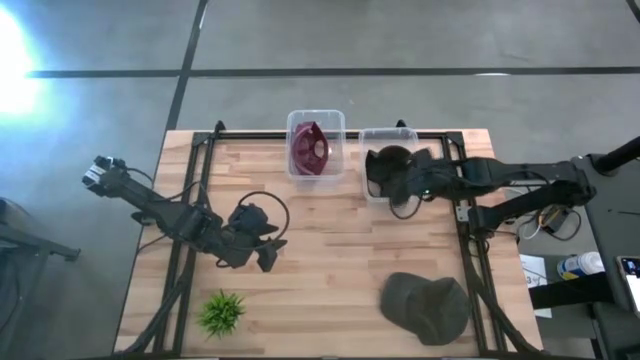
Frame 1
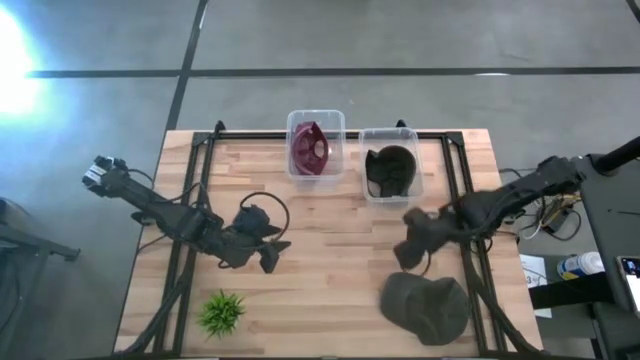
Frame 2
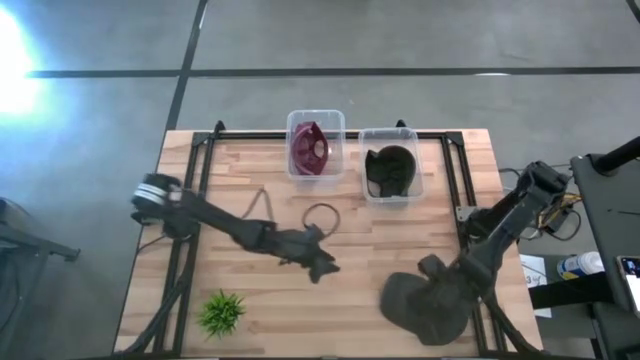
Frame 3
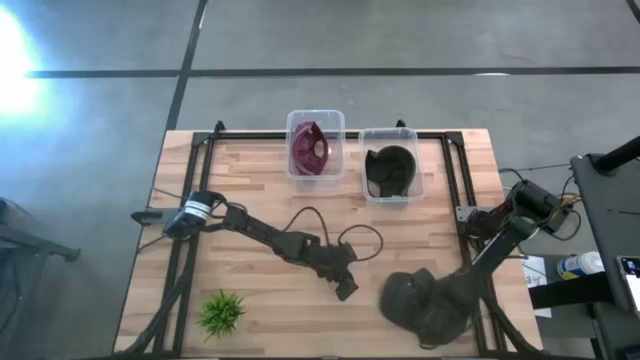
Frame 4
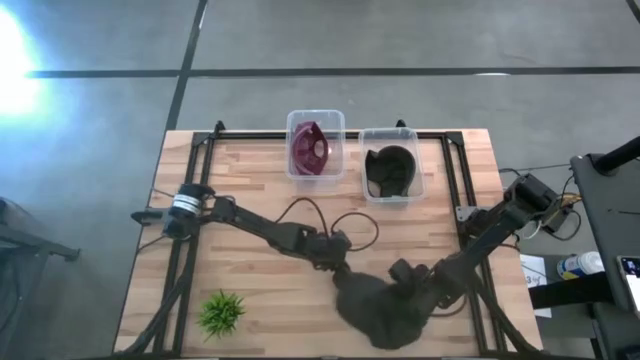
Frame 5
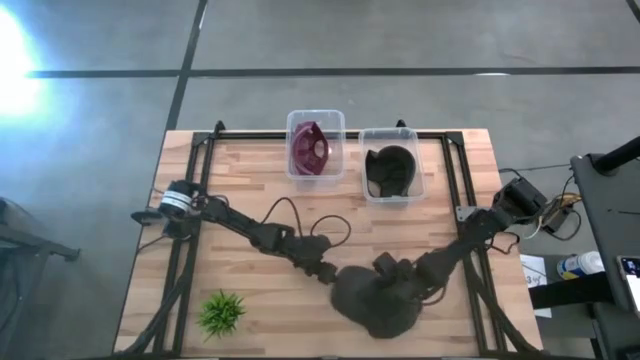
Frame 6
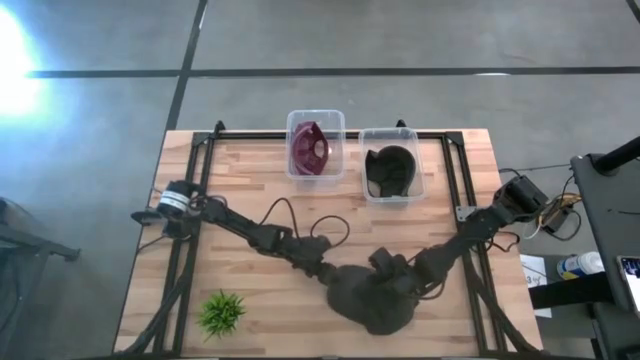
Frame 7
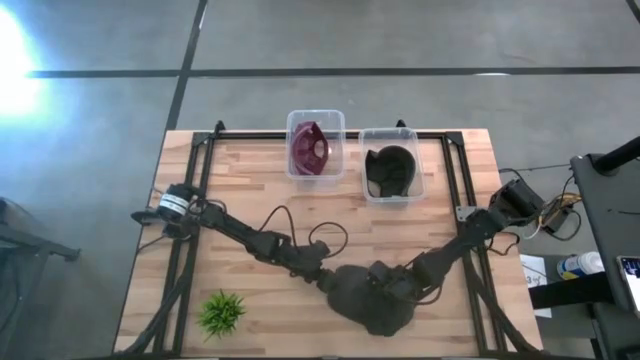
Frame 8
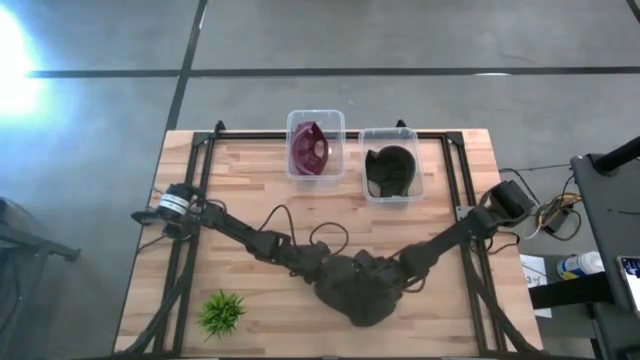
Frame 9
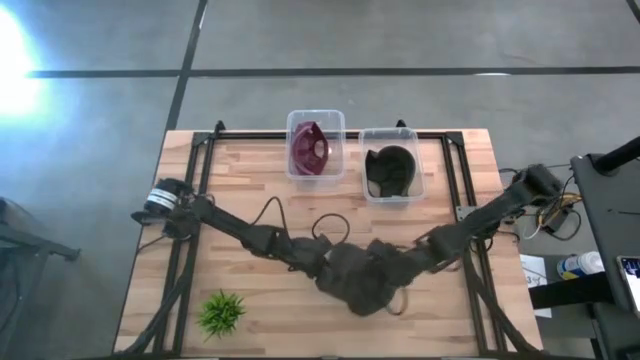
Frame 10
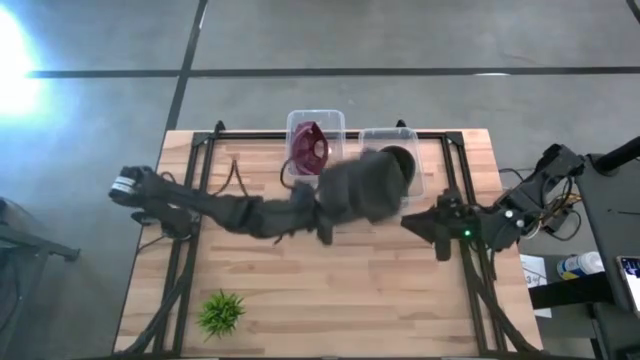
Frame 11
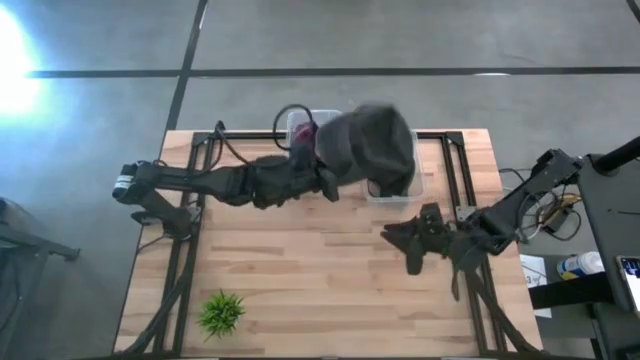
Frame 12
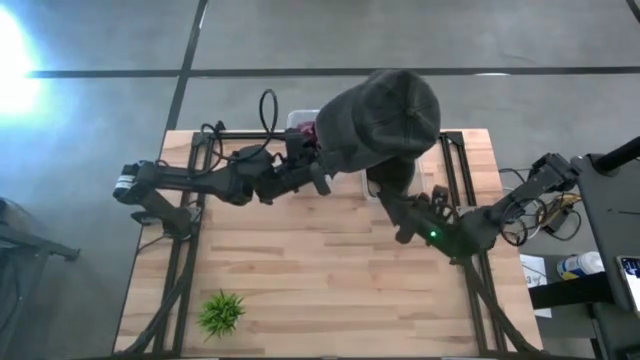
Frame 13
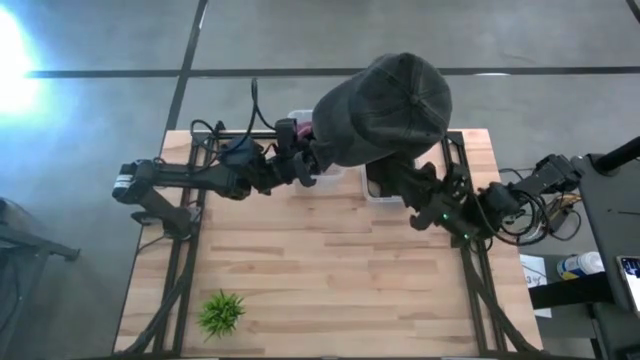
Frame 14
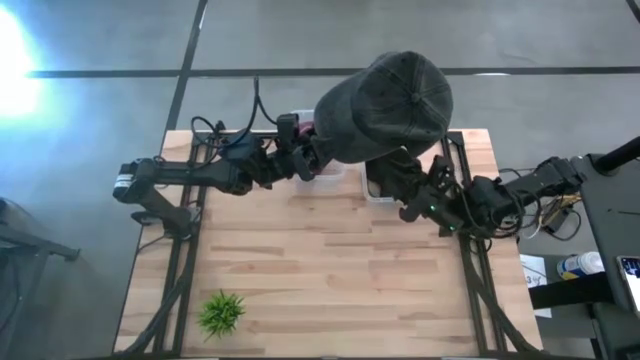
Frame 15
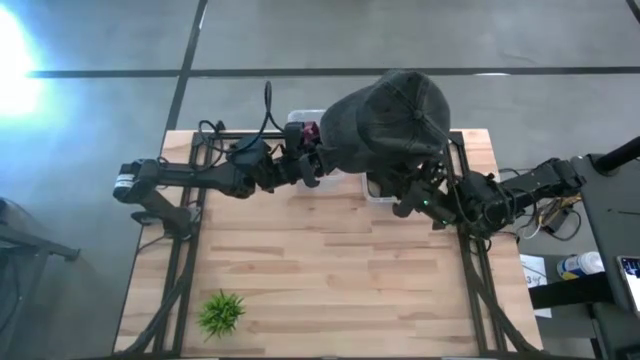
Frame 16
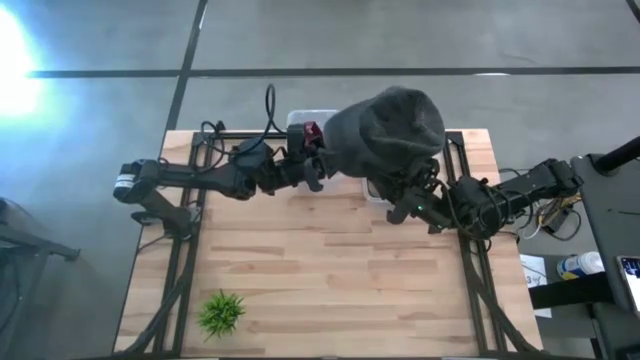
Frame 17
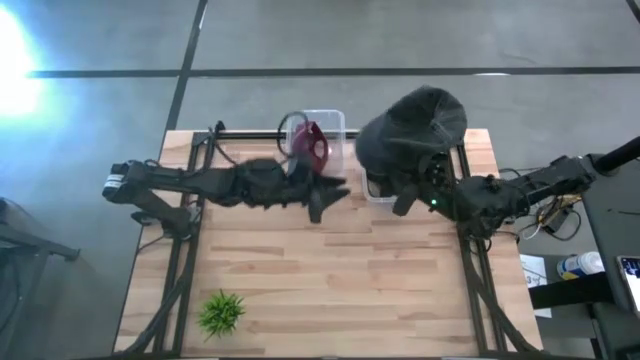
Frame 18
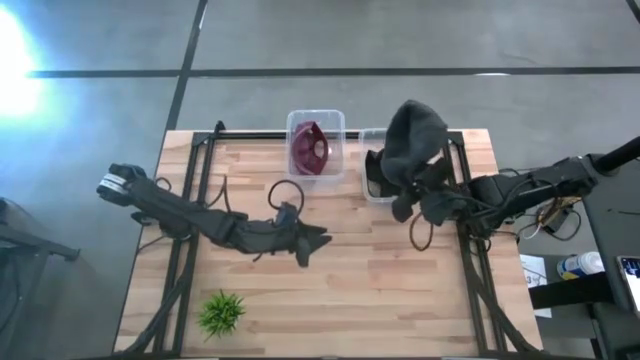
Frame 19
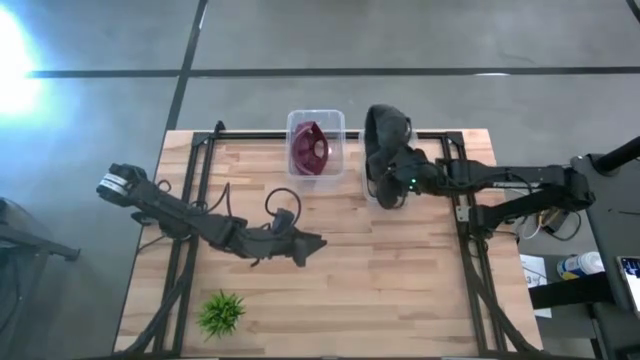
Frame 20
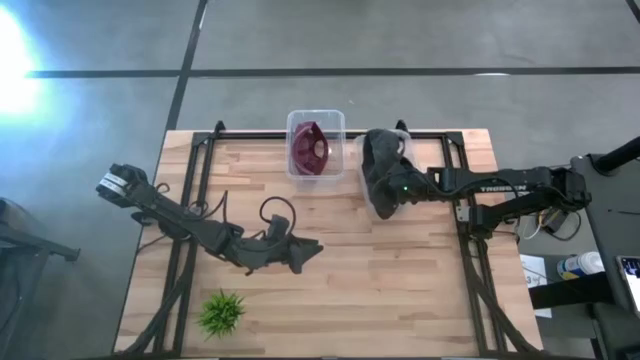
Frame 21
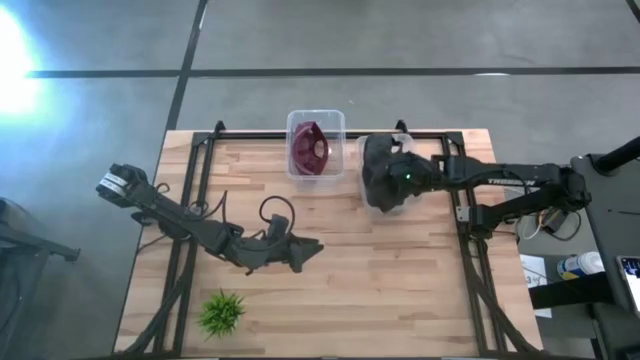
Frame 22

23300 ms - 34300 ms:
Task: Pick & Place hat
Put the black cap into the right transparent bin

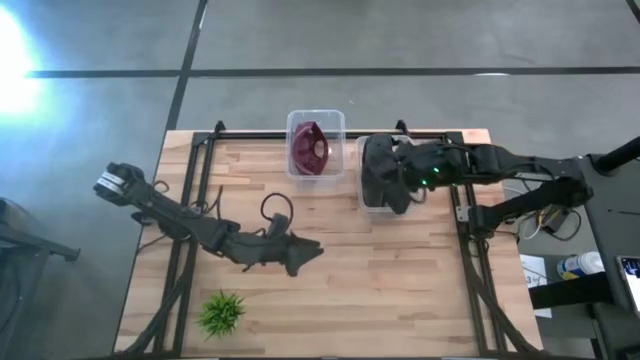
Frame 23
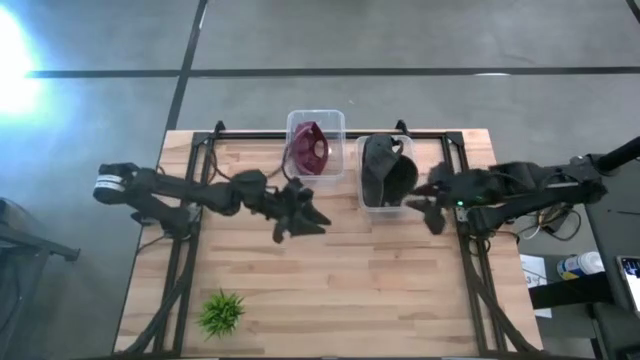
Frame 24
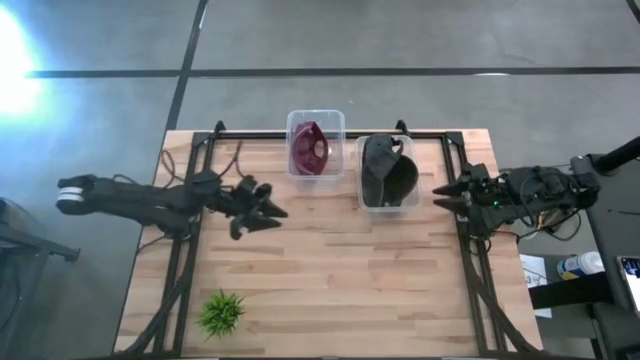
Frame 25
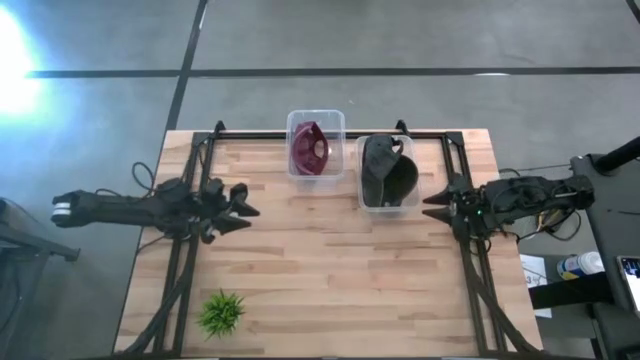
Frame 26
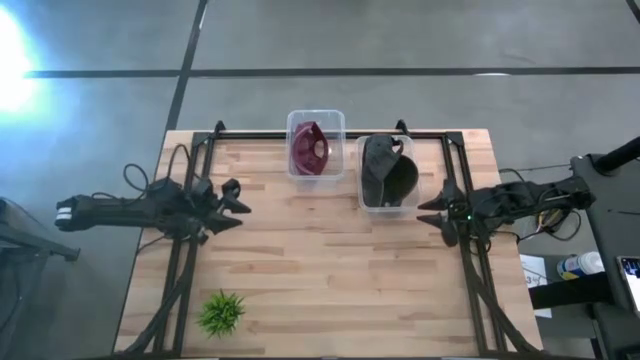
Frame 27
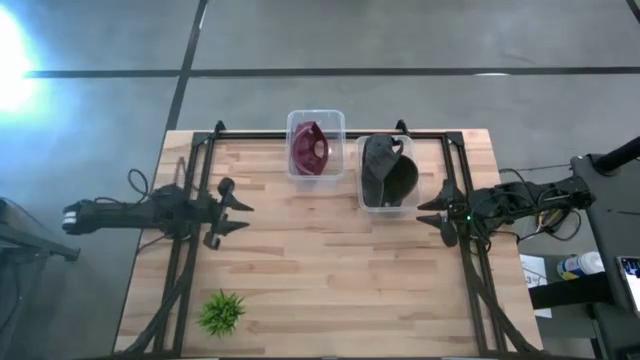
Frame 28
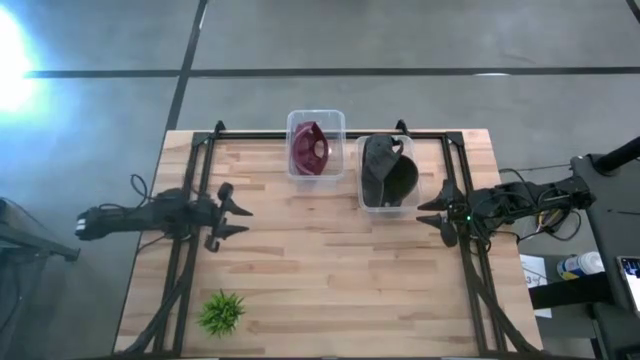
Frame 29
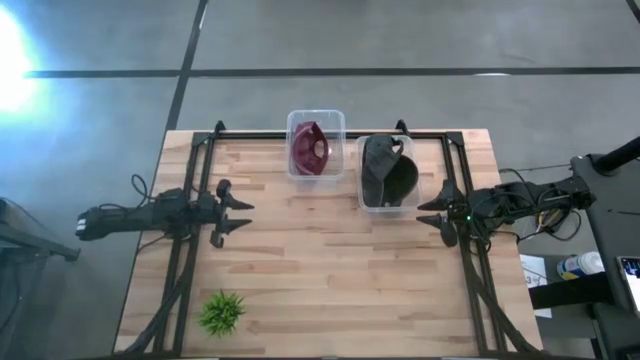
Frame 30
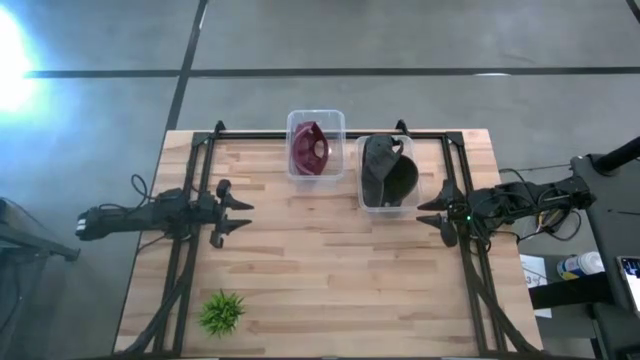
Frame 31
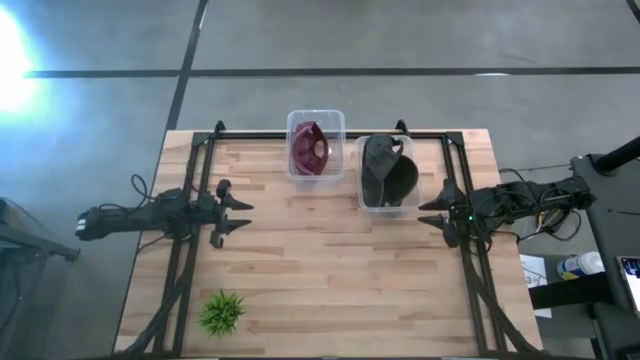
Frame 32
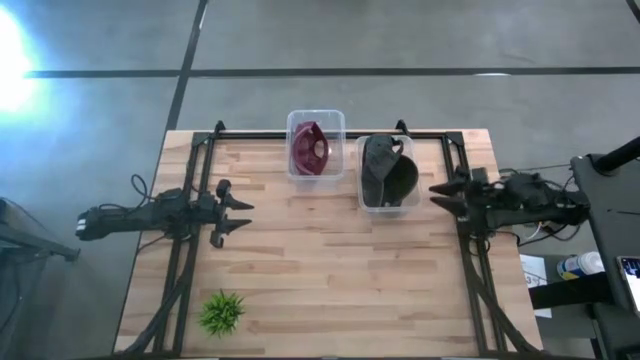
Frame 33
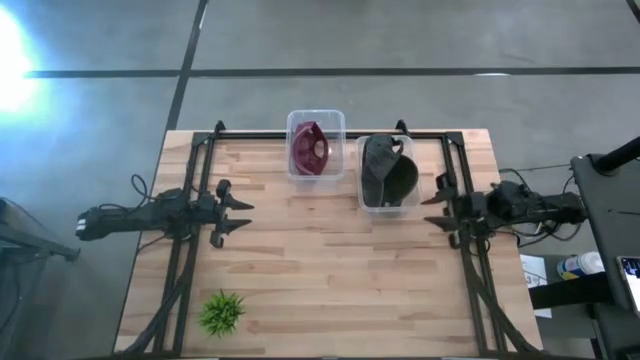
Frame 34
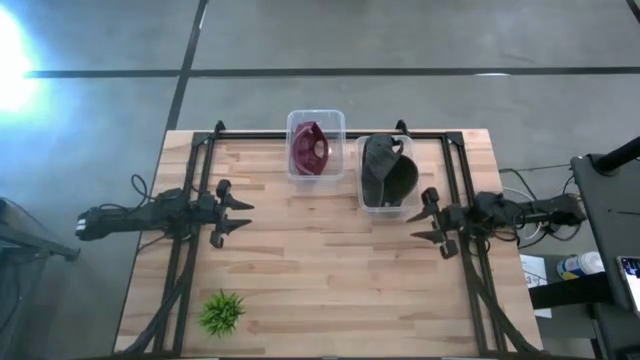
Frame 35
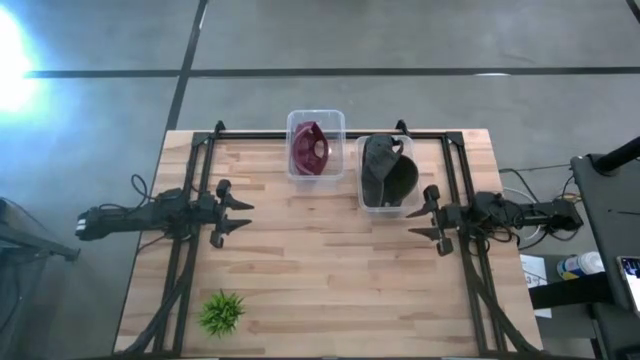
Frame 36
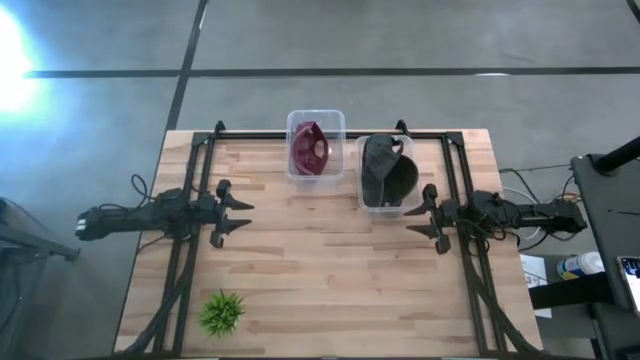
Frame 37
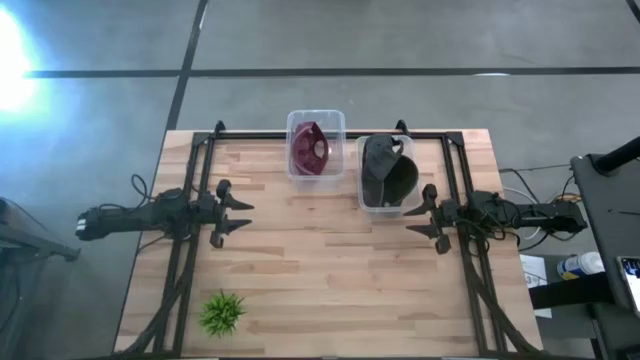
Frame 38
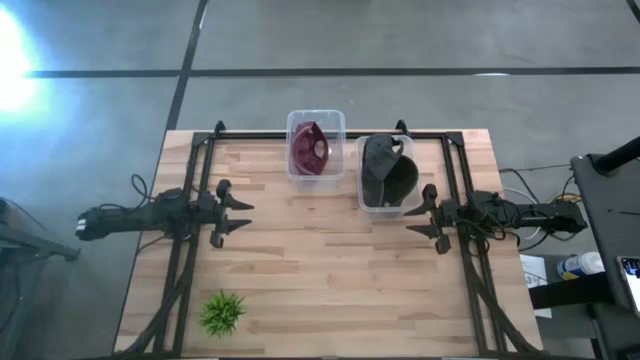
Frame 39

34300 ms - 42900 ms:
Return to Home Position
